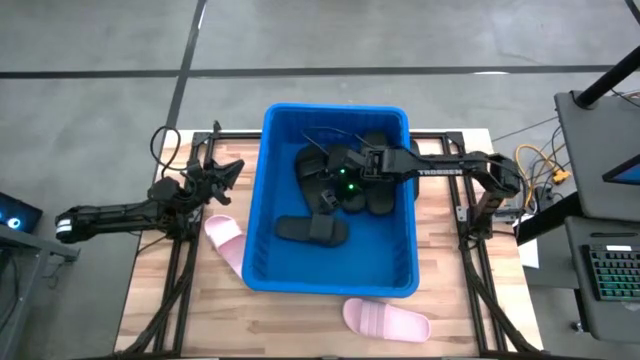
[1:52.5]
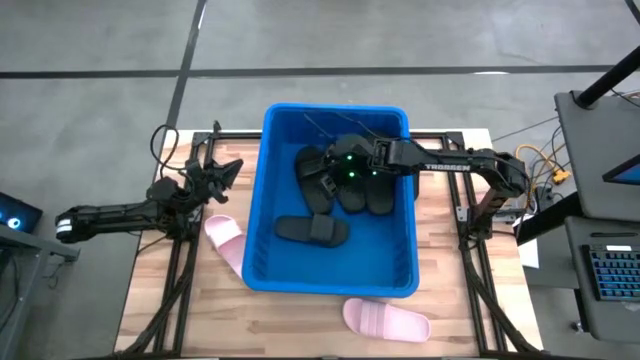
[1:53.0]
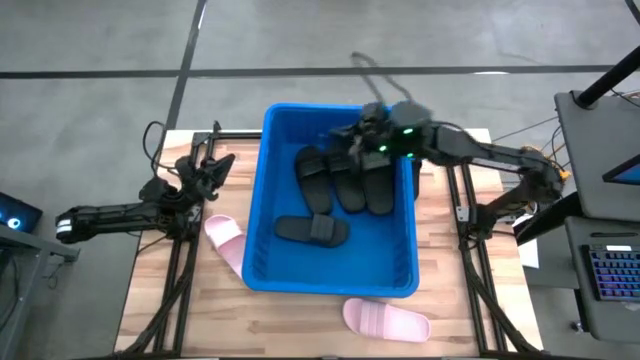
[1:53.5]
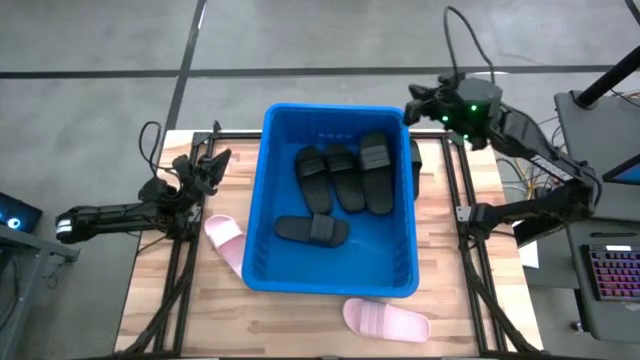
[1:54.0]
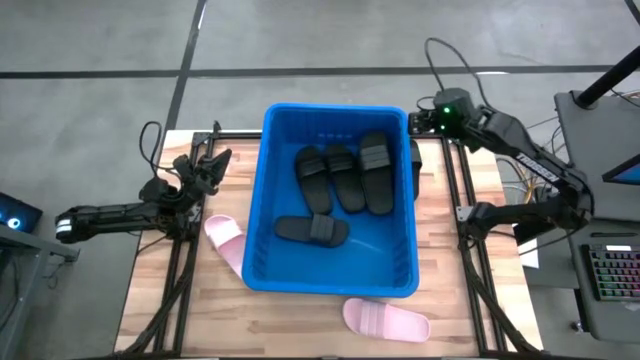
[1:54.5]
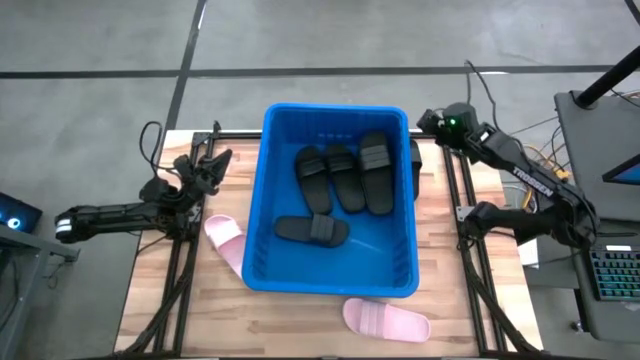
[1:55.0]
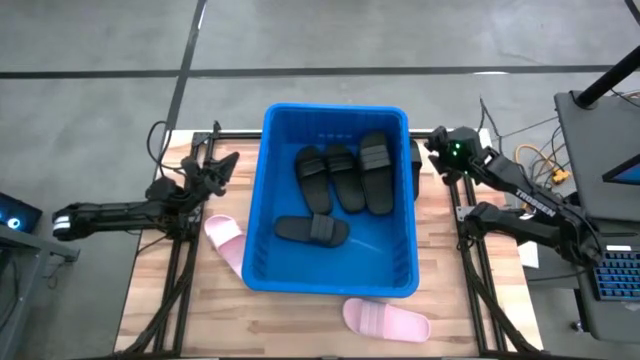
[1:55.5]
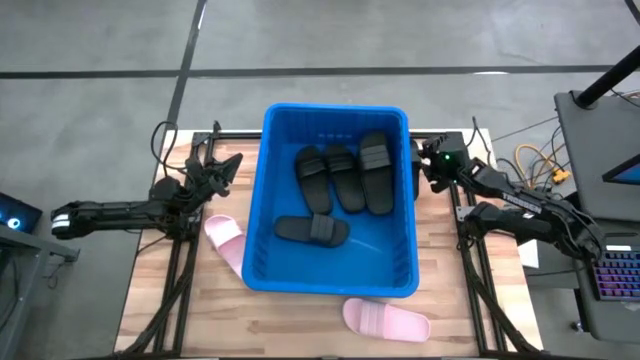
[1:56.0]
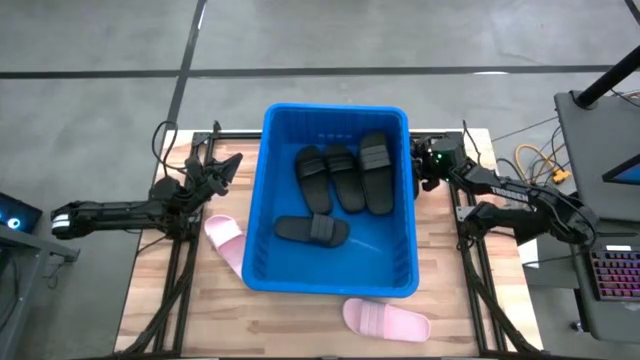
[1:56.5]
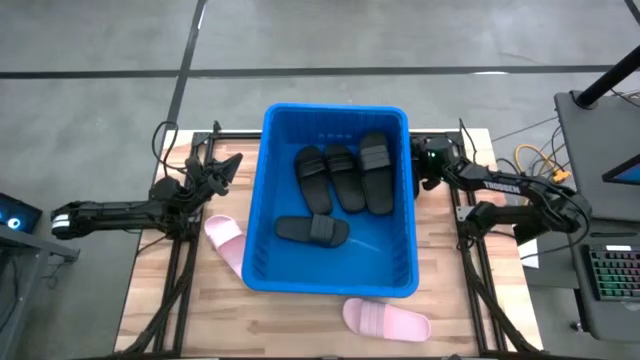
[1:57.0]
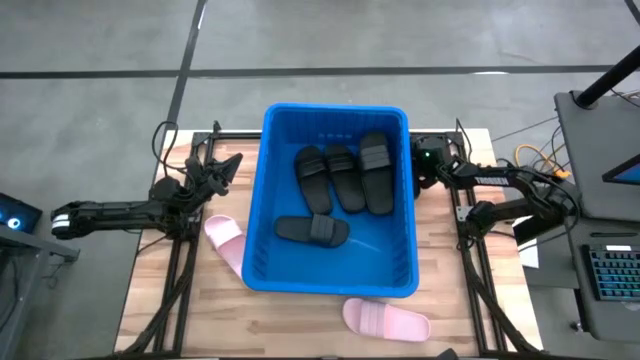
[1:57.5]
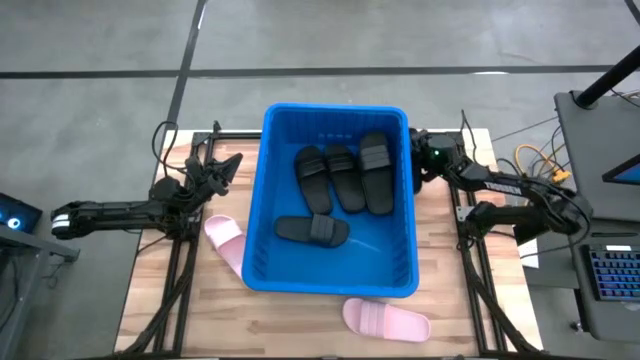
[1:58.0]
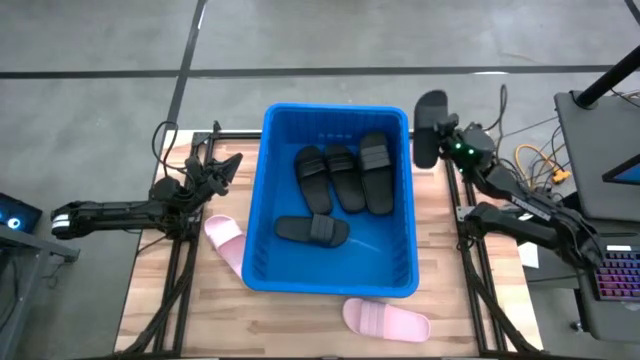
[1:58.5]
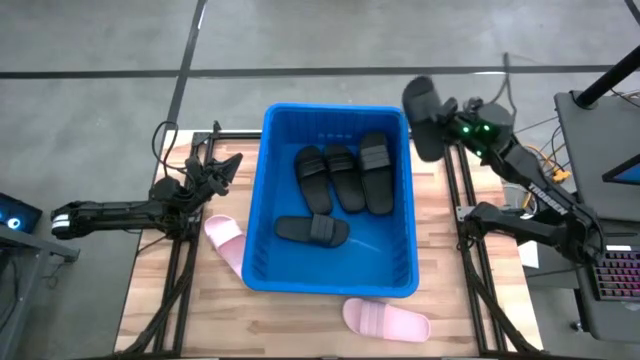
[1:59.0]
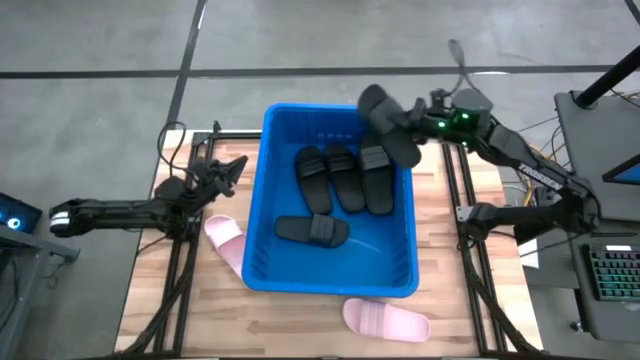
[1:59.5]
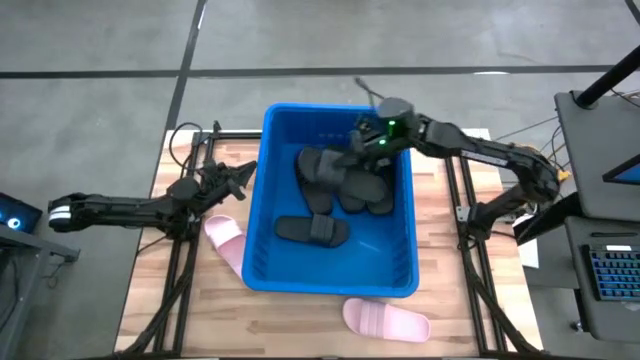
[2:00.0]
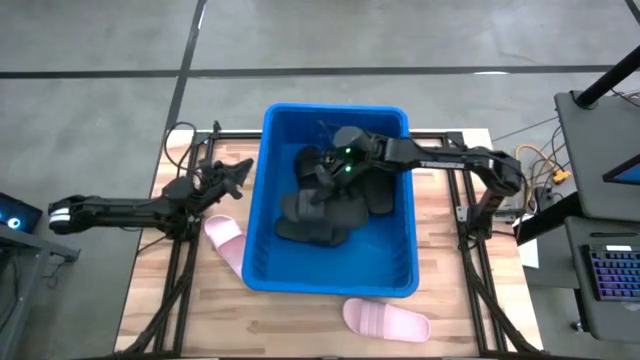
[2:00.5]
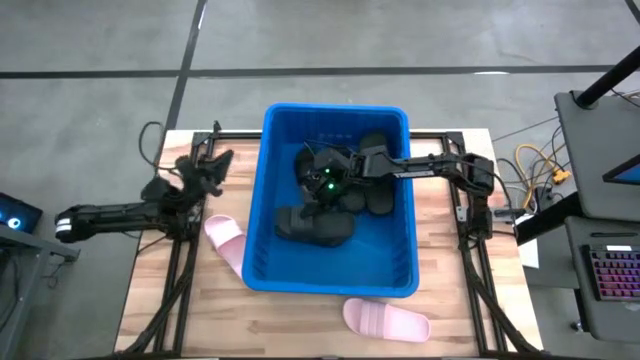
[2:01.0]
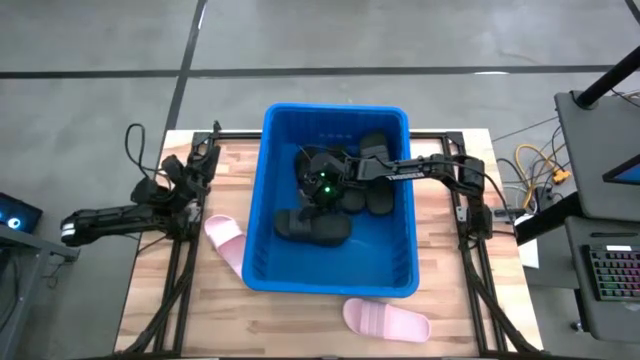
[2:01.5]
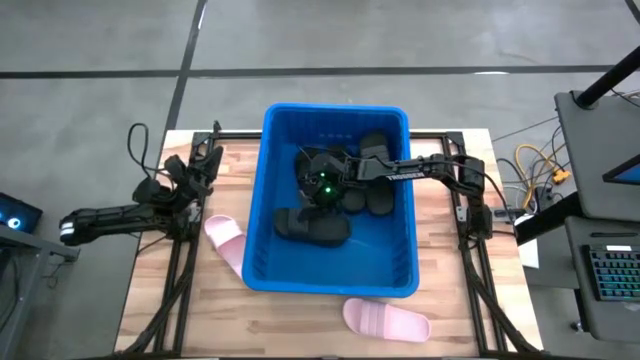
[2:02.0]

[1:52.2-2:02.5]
Task: Pick and place slides into bin
Put t the black slides into the blue organizer bin
